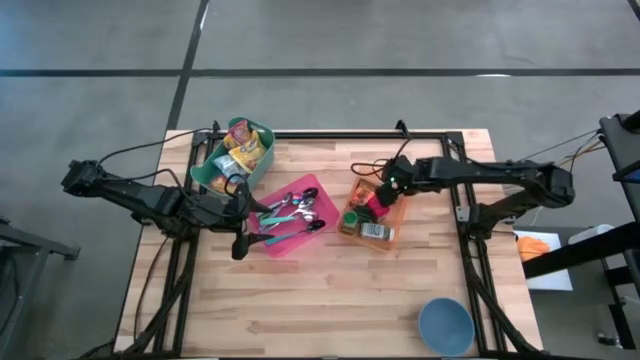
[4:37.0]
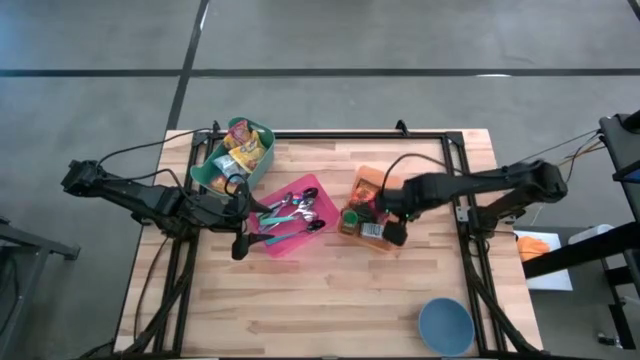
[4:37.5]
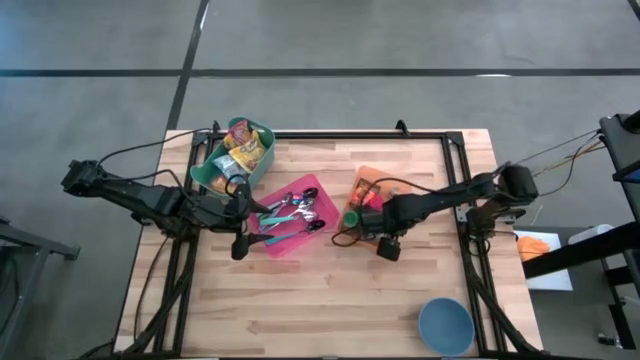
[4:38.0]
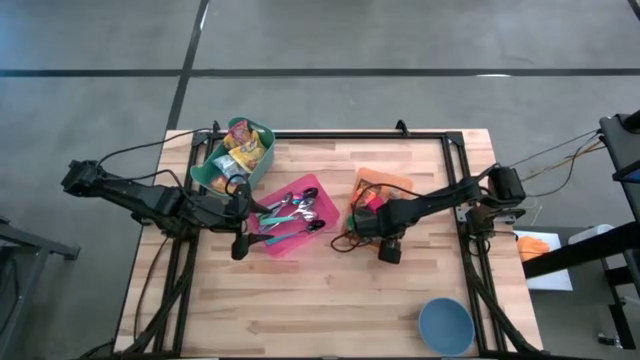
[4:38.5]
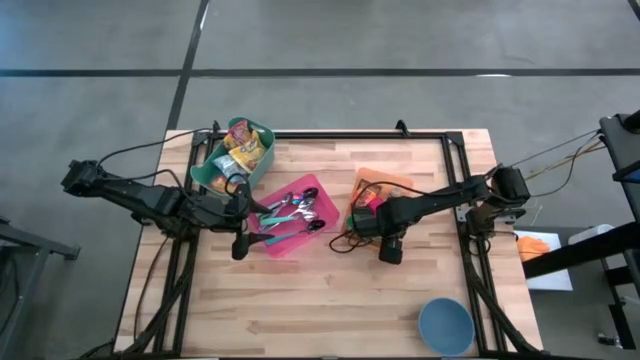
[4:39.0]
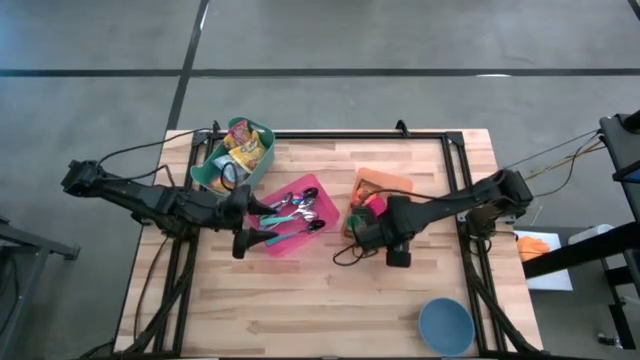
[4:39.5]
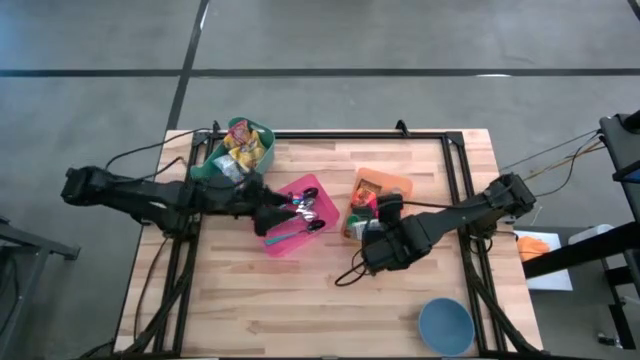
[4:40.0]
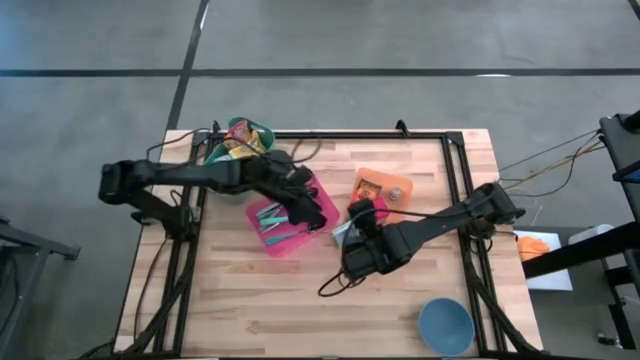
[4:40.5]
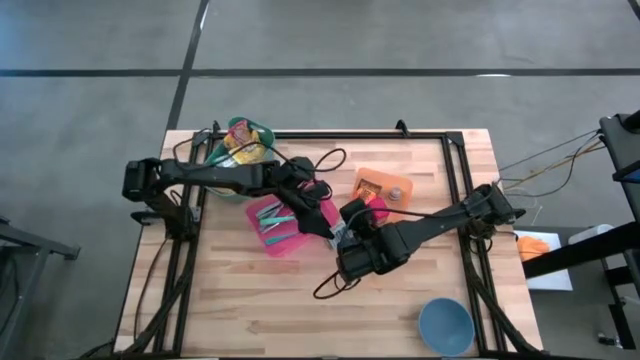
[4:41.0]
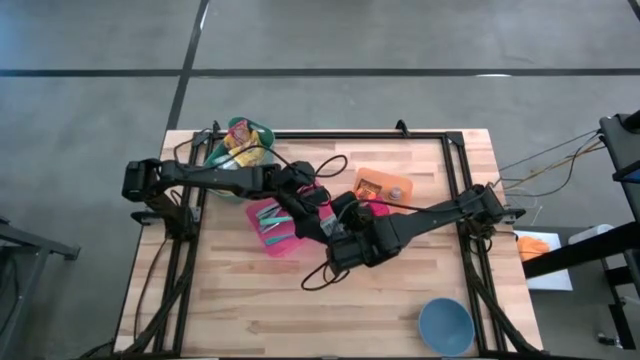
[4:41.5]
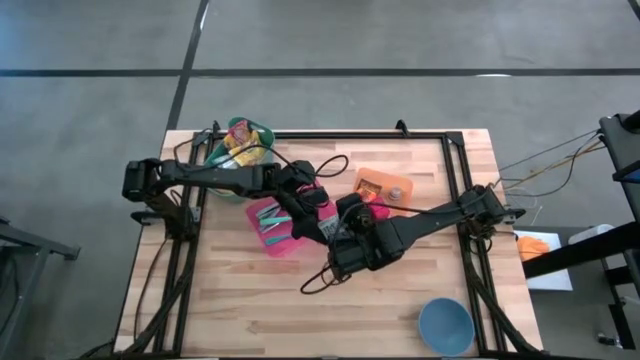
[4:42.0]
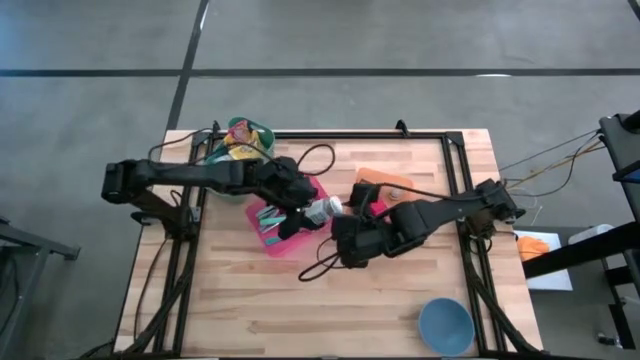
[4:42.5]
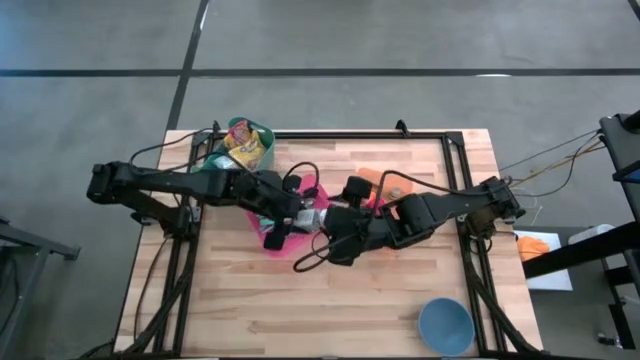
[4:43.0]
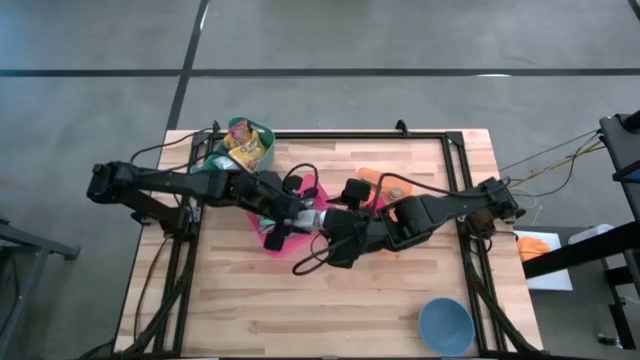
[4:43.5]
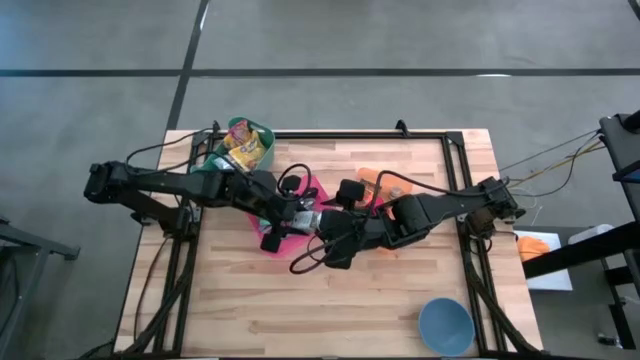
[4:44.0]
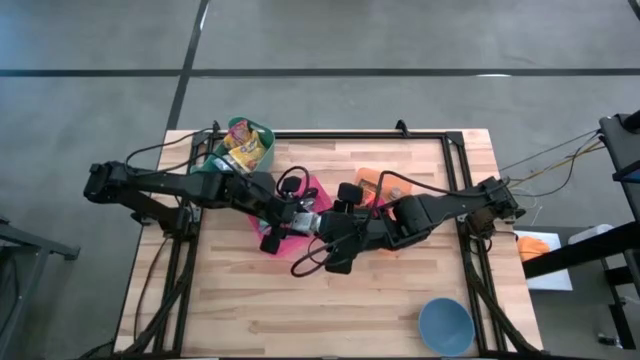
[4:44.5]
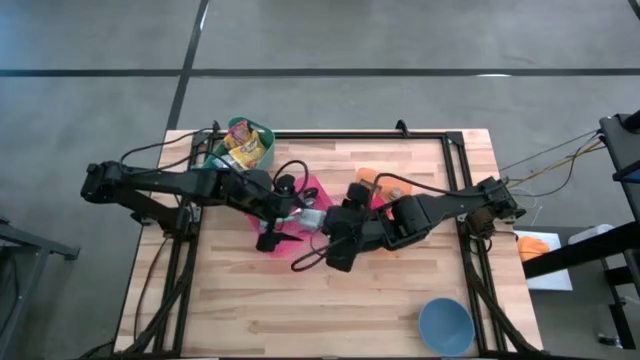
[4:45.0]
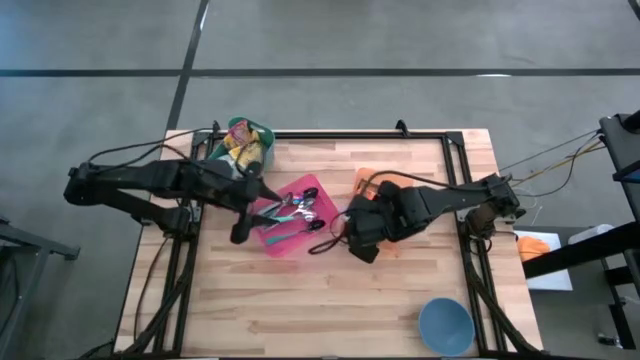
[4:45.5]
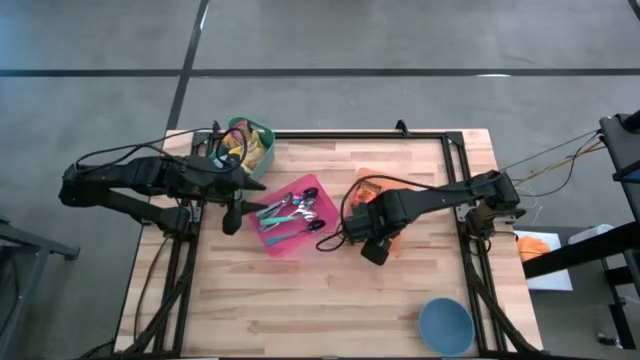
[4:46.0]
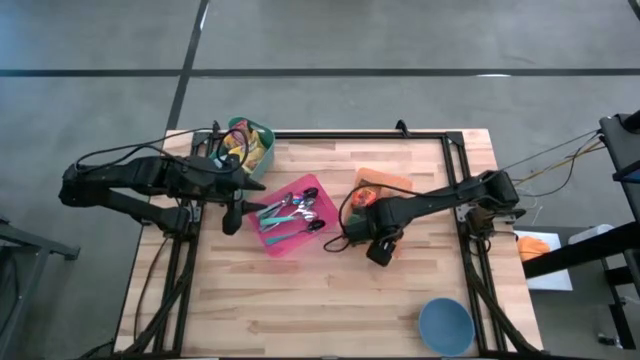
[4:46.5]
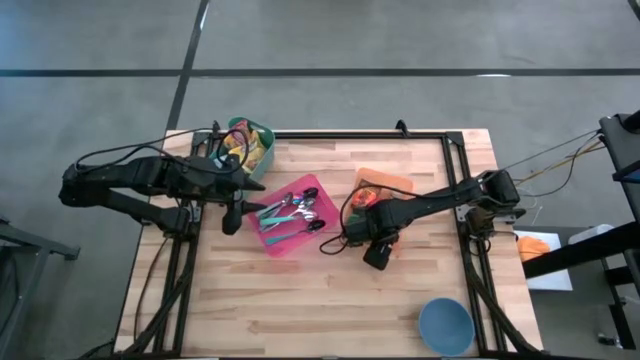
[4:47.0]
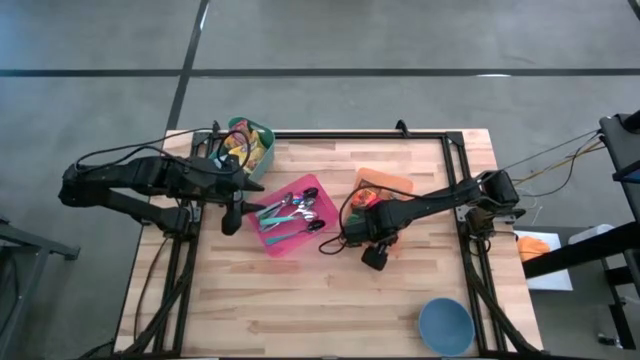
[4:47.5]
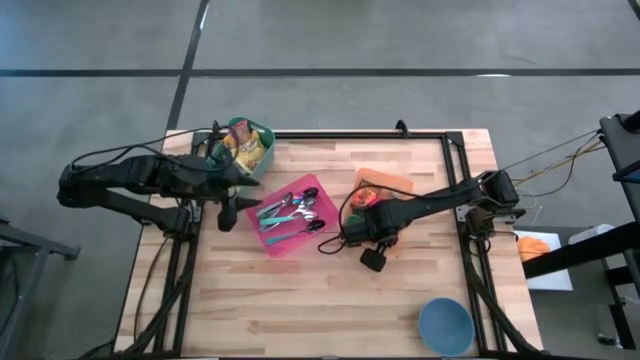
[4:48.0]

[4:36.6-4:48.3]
Adjust the white seasoning bottle in the orange bin

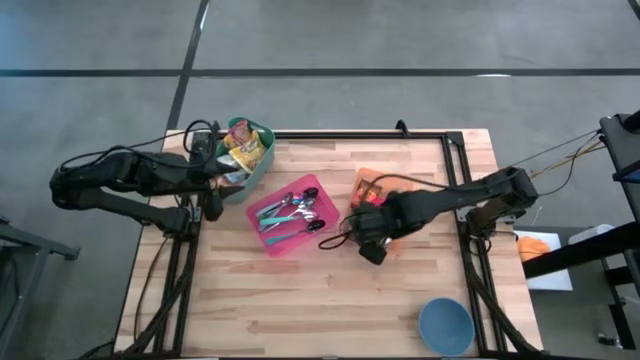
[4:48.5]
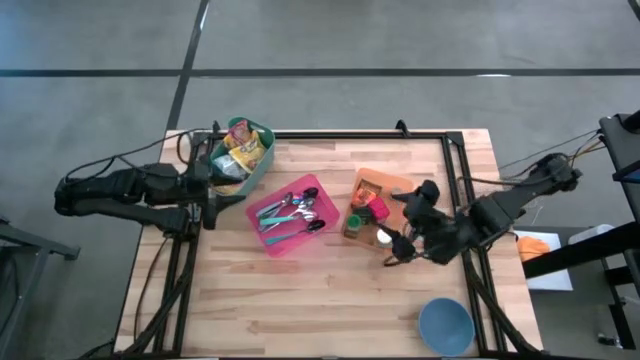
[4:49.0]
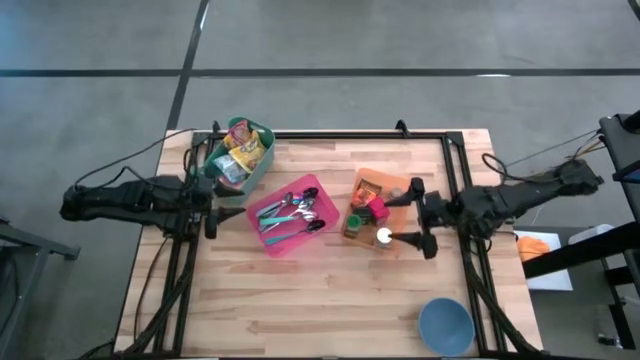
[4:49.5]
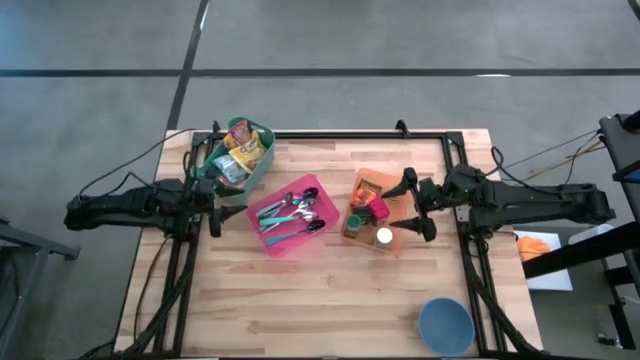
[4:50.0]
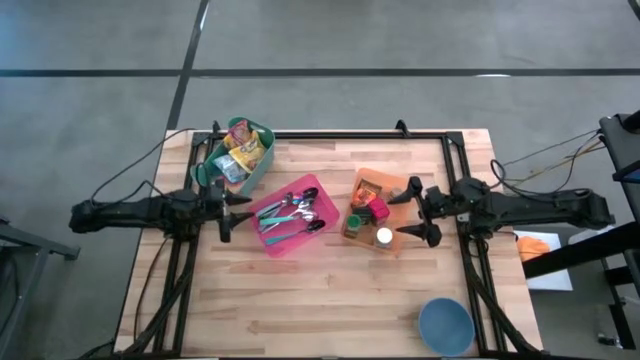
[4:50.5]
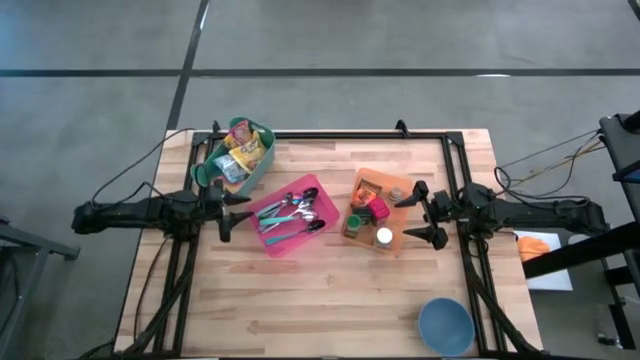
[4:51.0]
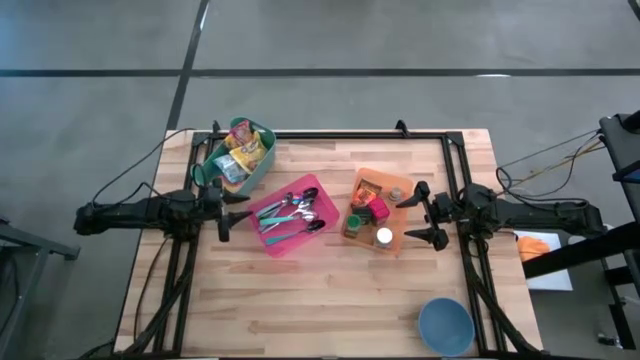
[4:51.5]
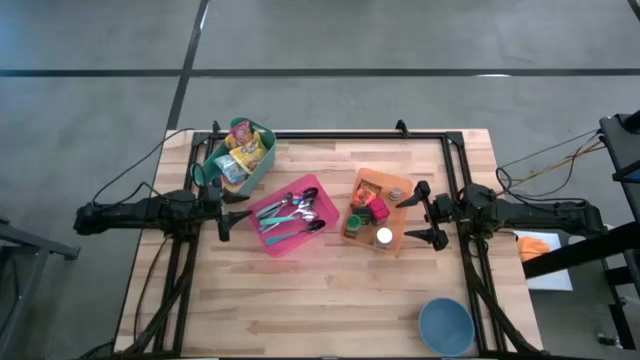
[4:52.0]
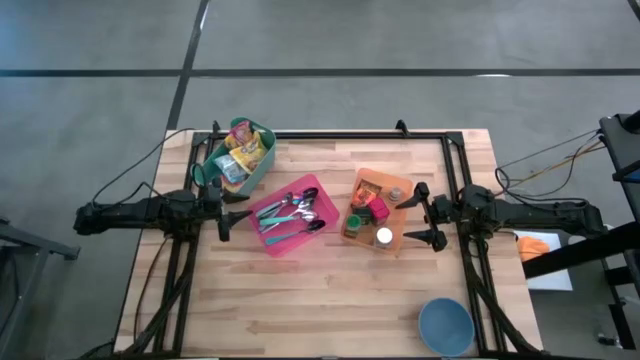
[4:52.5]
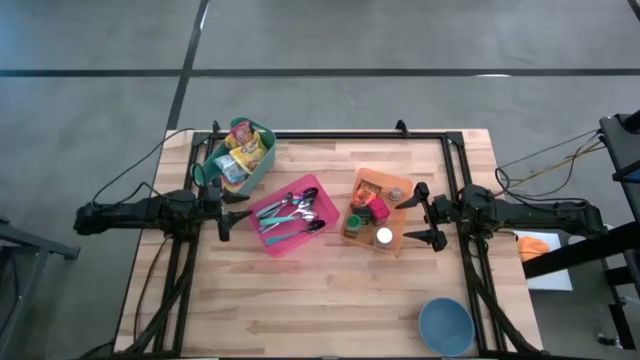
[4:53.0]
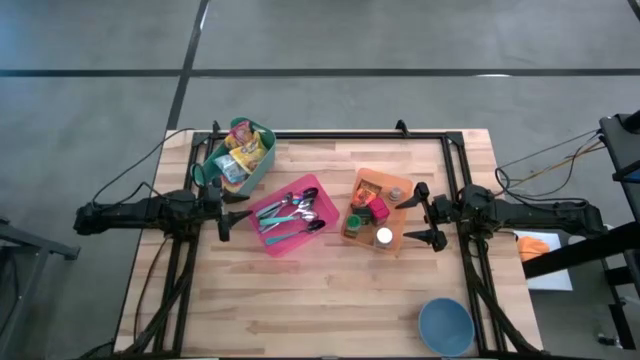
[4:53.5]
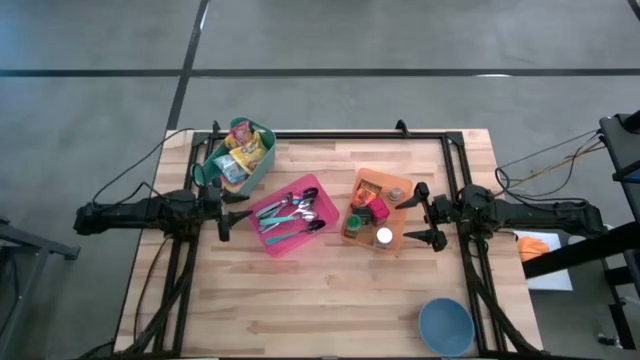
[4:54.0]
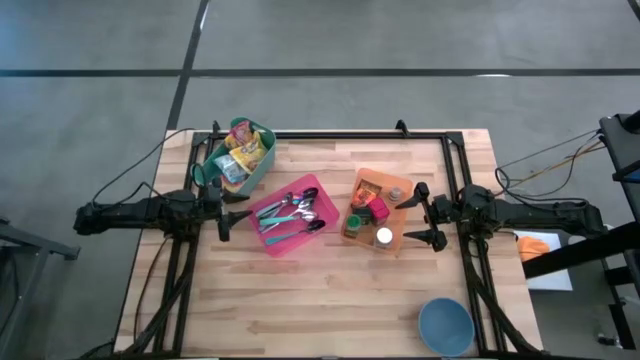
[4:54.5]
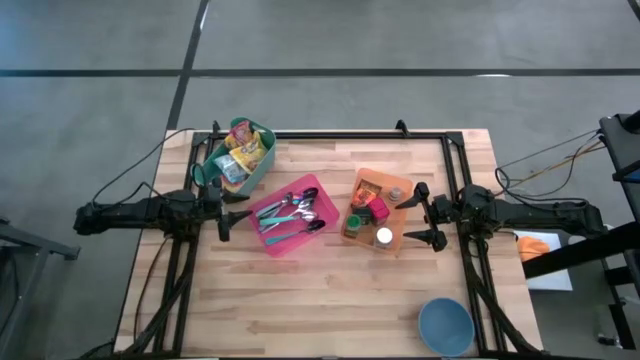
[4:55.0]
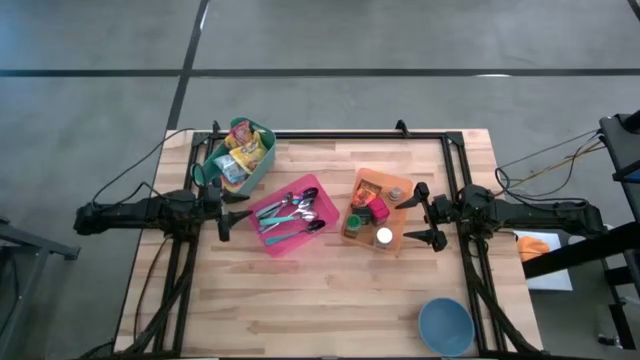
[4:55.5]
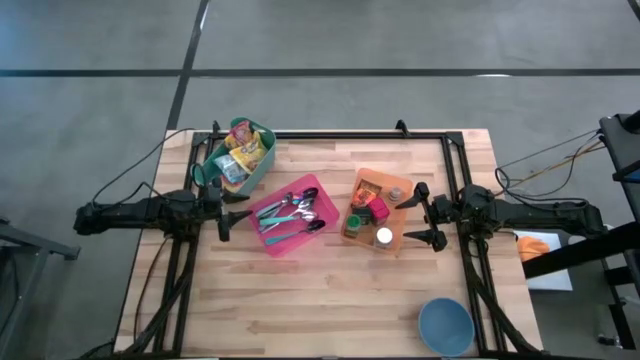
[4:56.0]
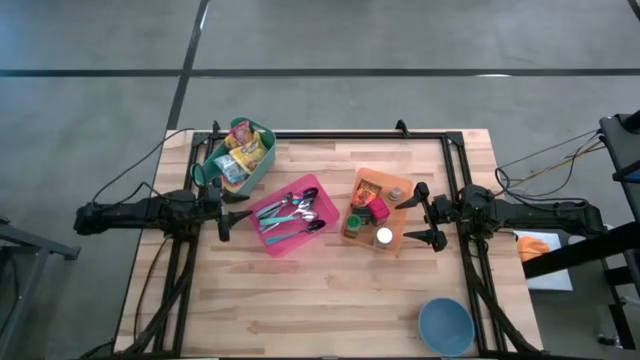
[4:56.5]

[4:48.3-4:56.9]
Return to Home Position
